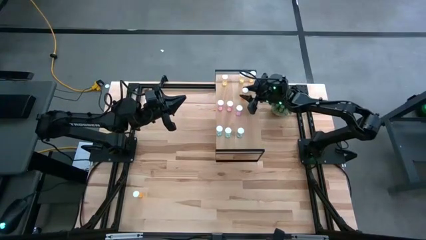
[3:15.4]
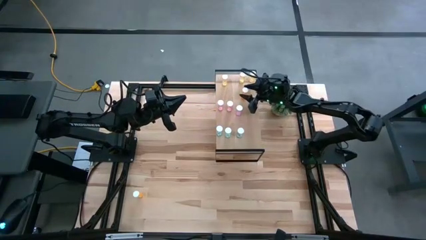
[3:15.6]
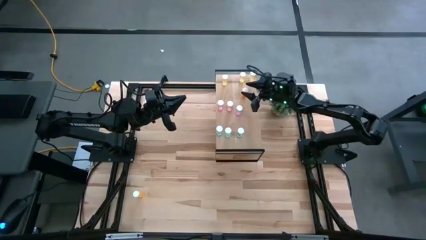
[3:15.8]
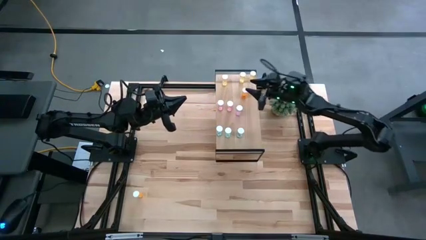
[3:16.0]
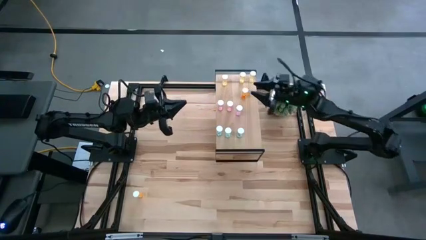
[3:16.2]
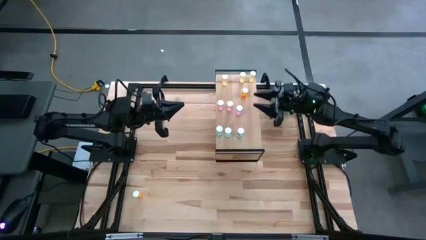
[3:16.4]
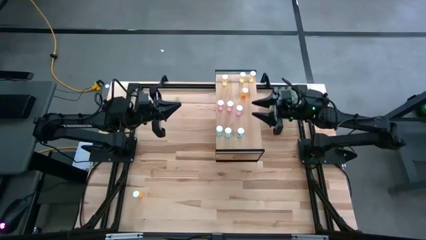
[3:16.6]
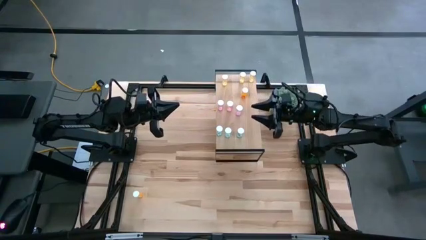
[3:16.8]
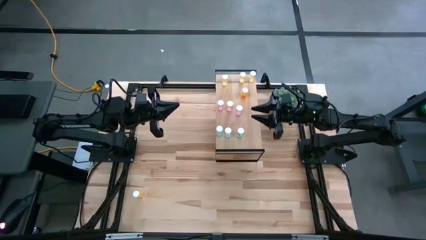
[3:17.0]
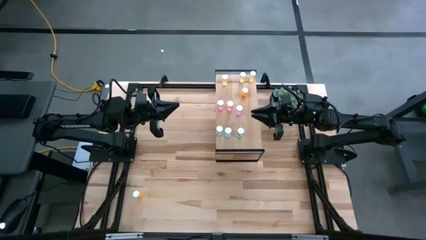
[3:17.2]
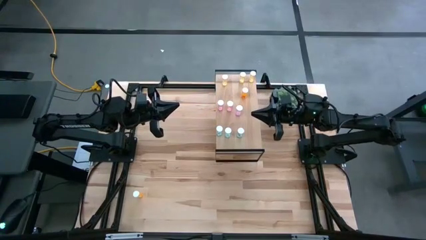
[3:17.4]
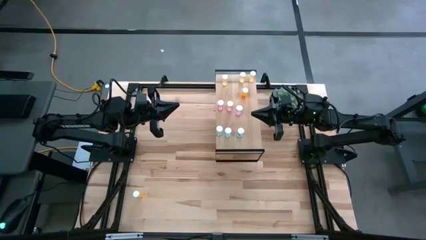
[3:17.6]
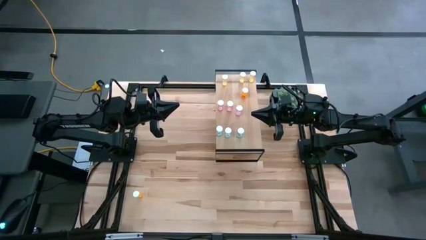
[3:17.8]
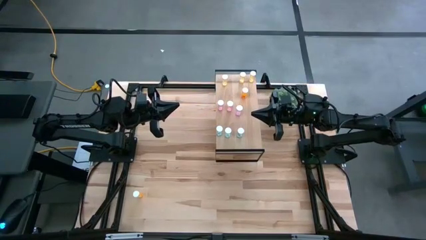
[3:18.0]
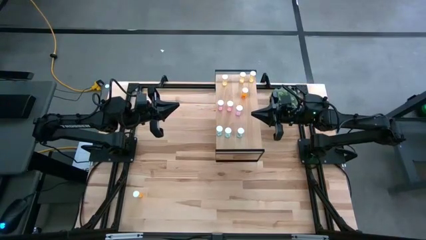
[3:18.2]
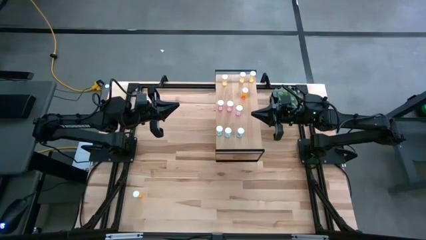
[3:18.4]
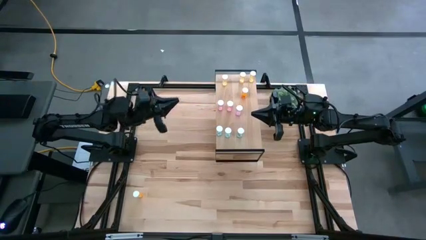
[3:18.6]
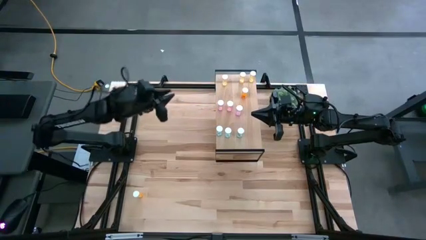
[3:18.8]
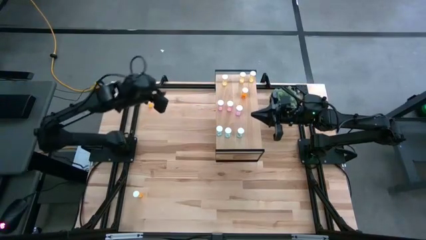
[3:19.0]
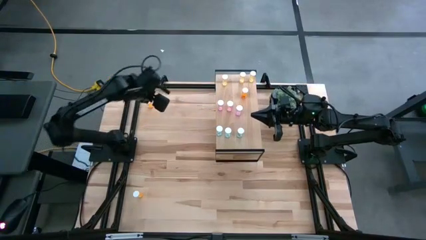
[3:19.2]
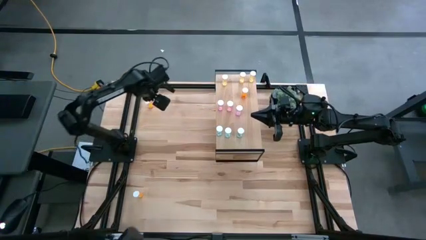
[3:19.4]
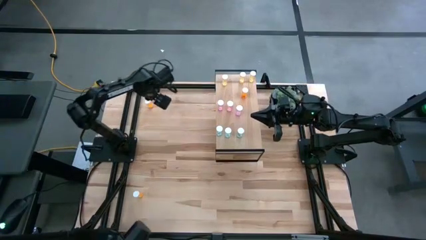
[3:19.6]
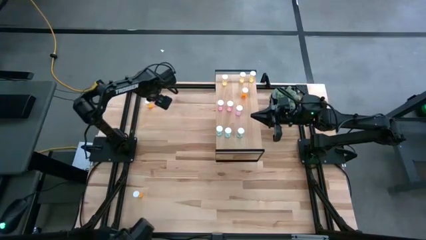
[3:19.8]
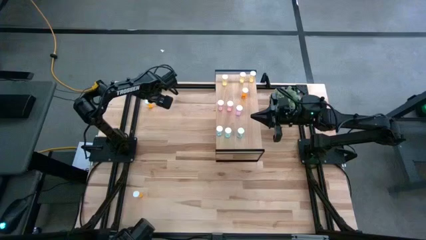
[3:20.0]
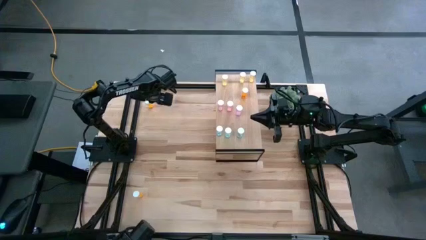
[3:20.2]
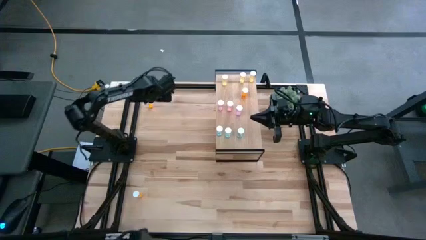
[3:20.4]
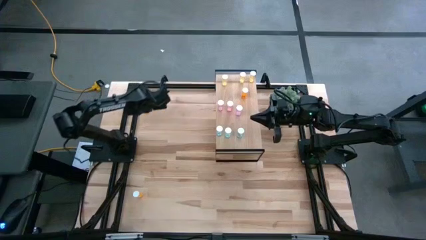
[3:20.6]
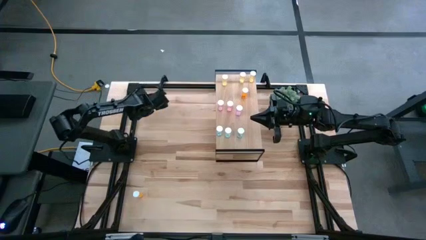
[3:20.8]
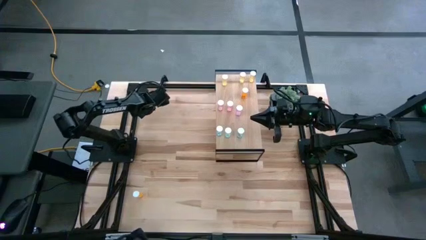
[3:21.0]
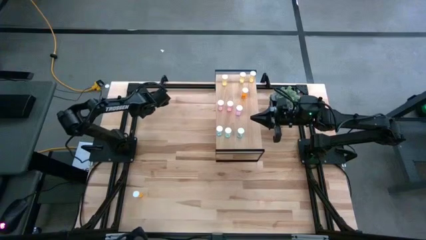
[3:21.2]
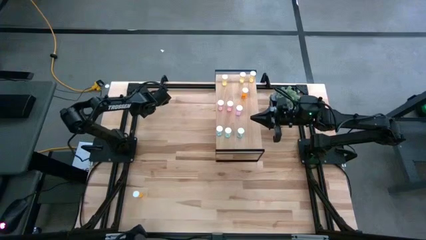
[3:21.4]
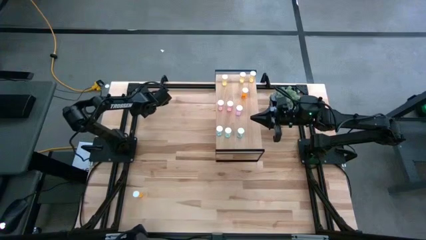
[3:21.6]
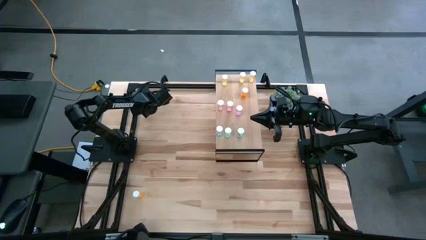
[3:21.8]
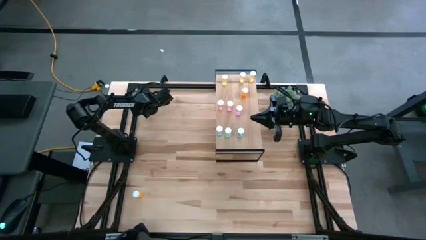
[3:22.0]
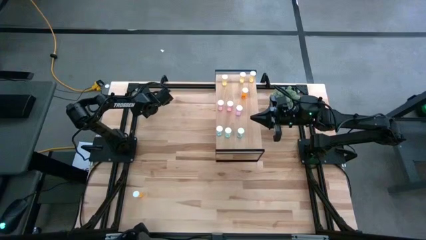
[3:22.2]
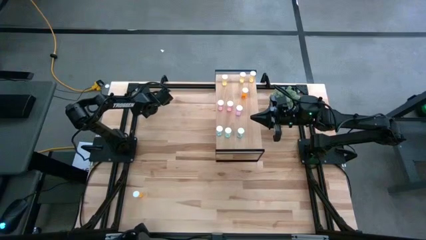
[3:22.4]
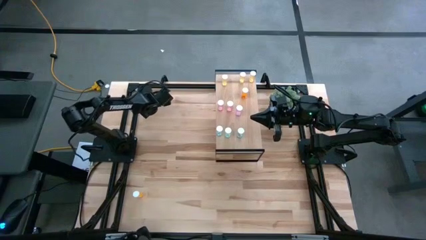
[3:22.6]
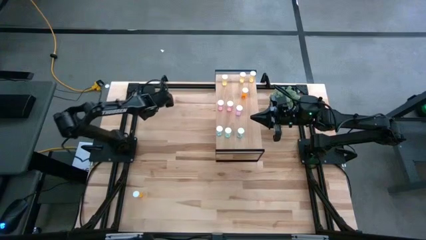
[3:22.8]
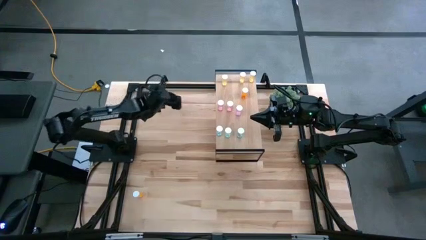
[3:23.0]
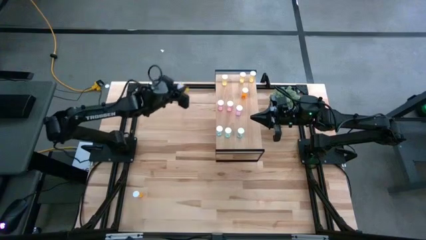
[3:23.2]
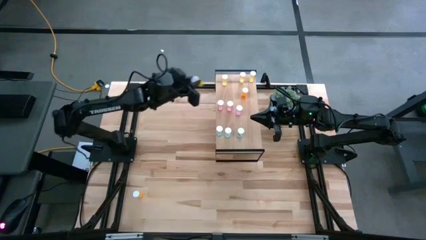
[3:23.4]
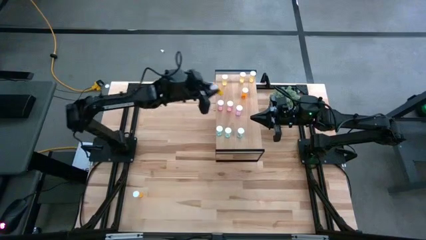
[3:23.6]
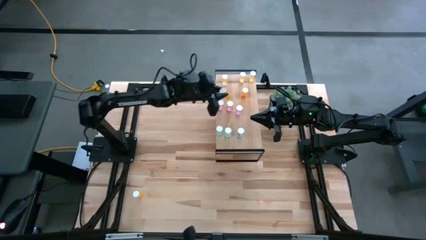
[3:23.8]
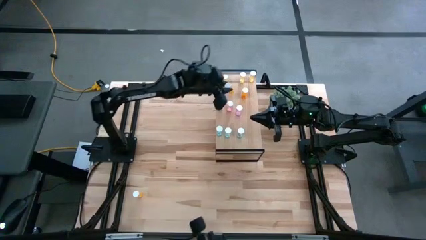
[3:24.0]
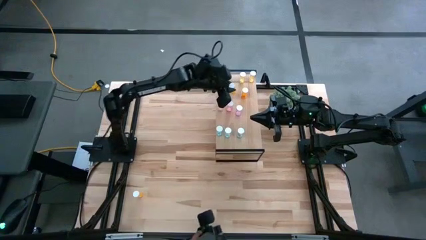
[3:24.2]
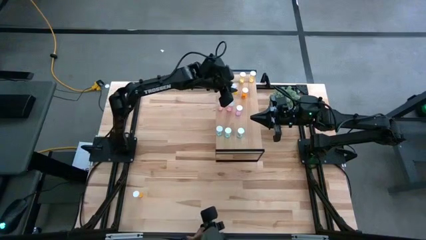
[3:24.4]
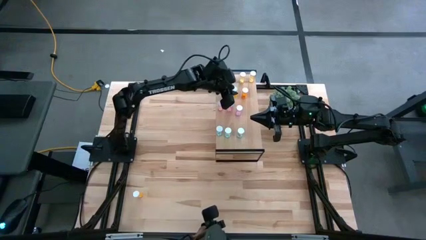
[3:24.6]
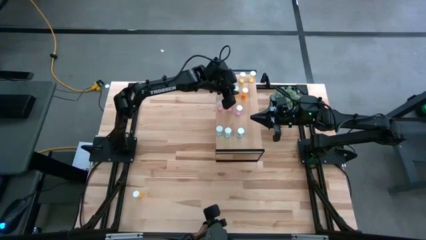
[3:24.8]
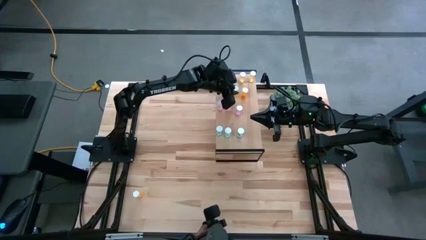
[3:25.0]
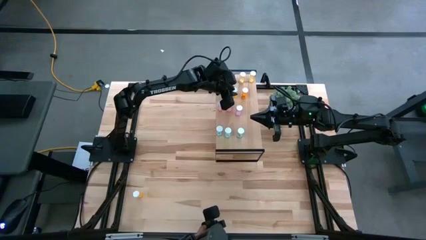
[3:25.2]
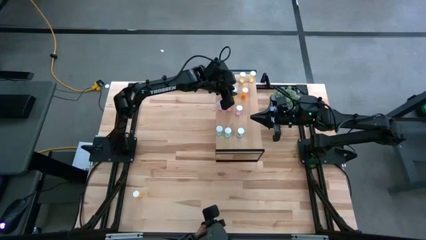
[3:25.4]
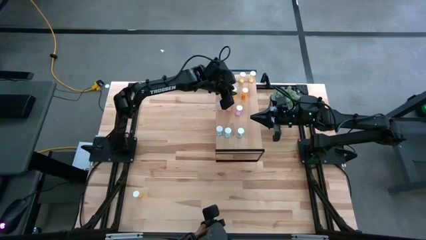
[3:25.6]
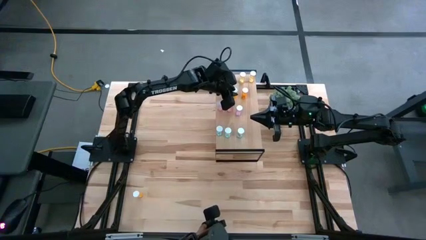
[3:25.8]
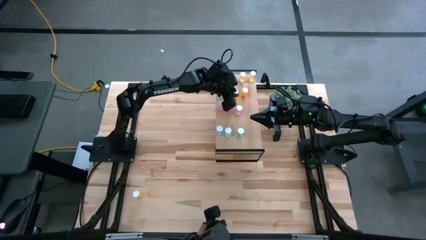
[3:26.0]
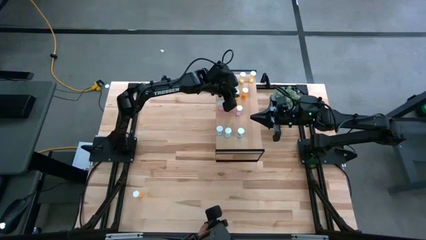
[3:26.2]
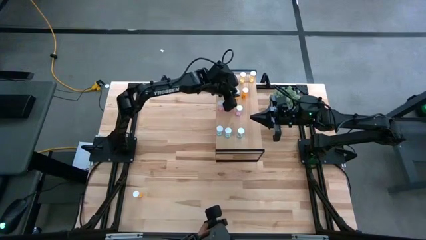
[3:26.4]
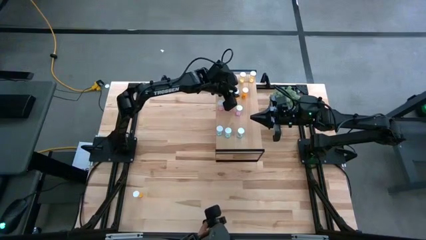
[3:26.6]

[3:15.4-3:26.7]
Task: Pick and place medicine bottles onto shelf by color
Put the top orange pill bottle on the shelf aligned with the other orange pill bottle

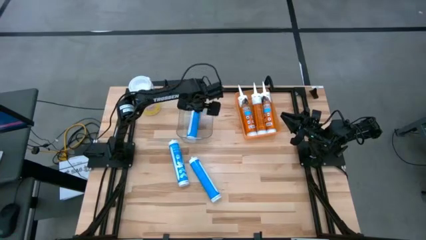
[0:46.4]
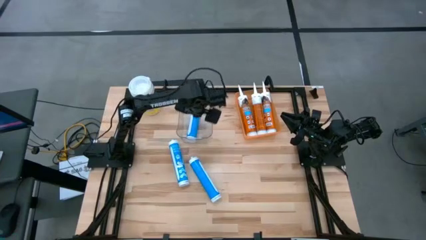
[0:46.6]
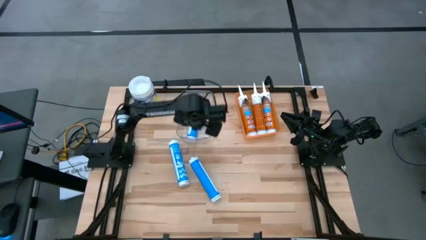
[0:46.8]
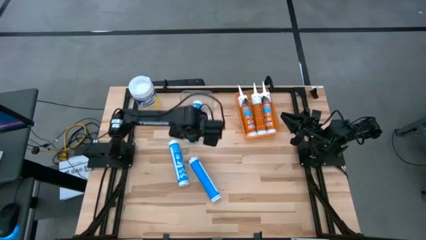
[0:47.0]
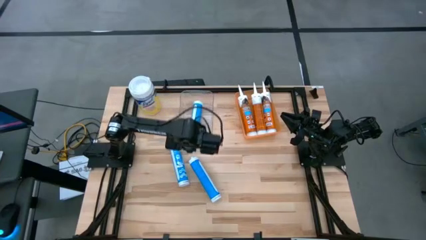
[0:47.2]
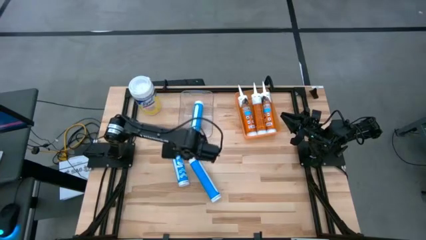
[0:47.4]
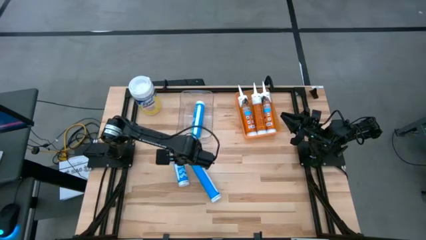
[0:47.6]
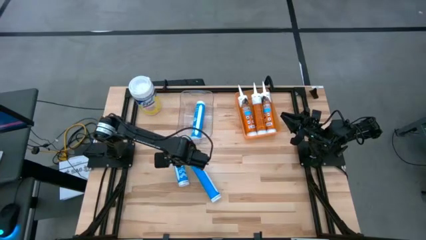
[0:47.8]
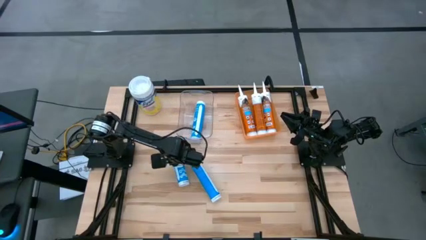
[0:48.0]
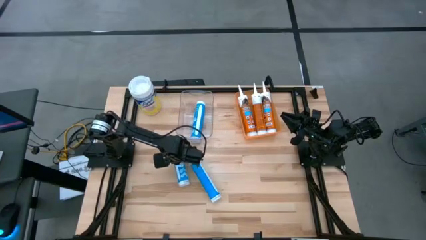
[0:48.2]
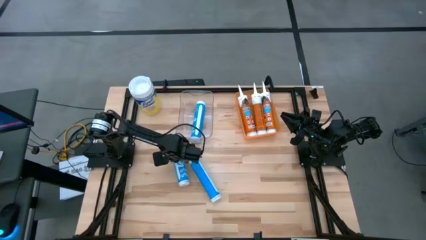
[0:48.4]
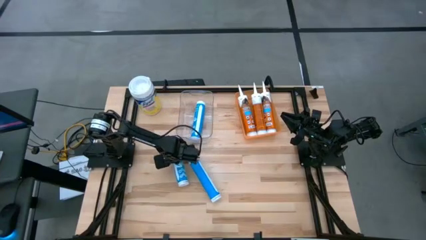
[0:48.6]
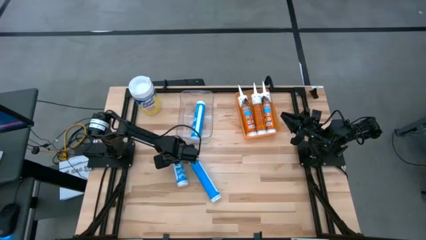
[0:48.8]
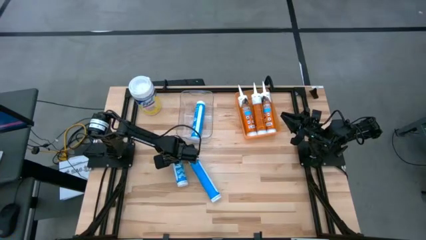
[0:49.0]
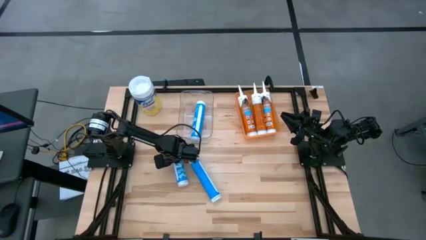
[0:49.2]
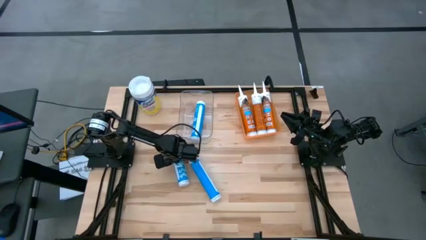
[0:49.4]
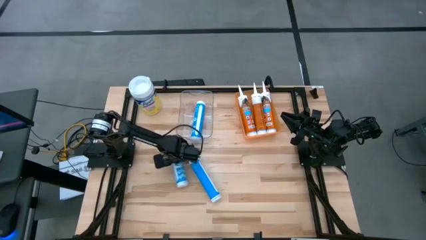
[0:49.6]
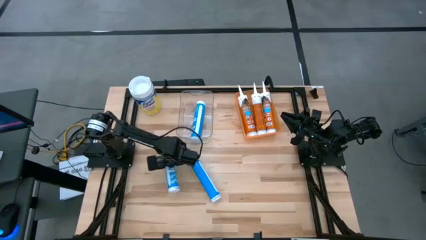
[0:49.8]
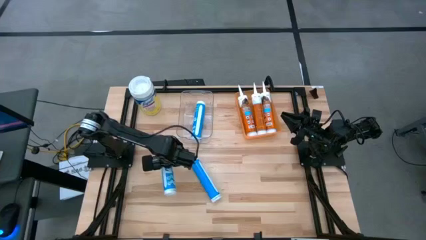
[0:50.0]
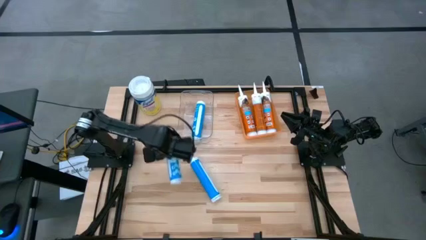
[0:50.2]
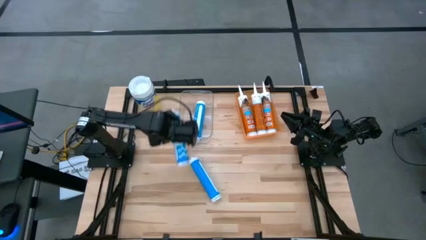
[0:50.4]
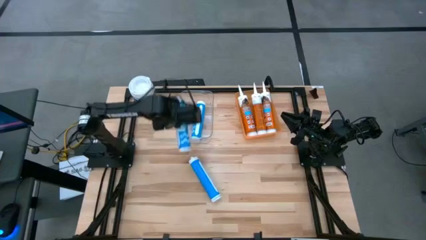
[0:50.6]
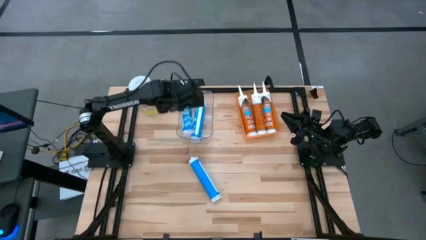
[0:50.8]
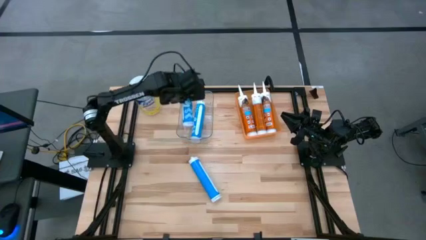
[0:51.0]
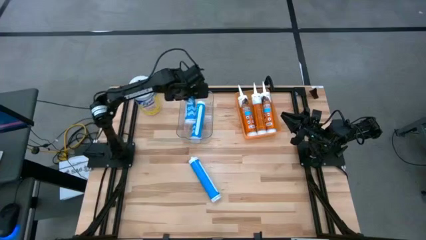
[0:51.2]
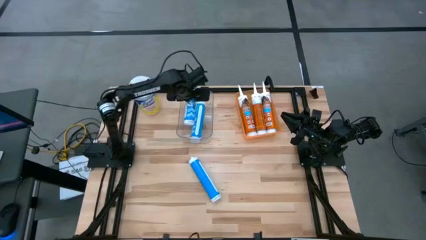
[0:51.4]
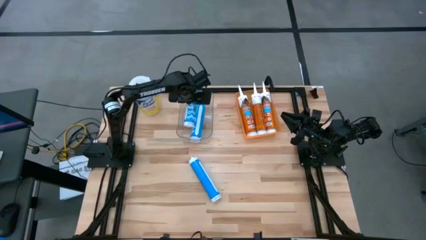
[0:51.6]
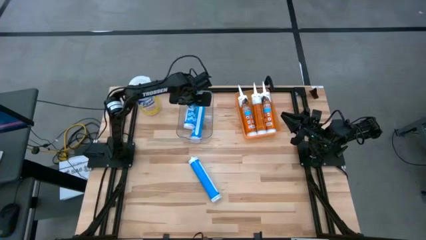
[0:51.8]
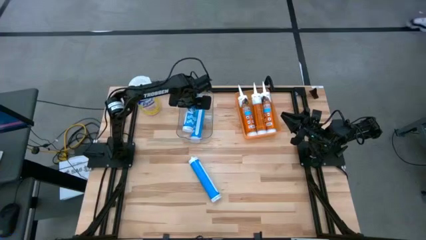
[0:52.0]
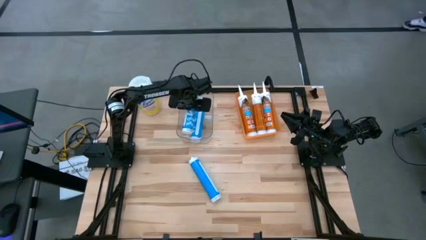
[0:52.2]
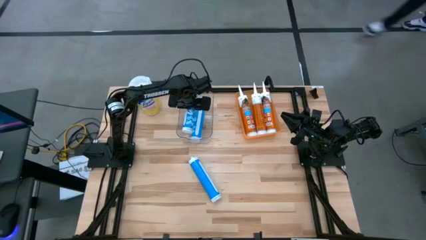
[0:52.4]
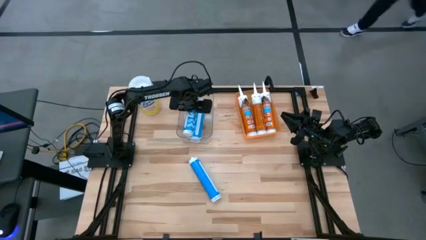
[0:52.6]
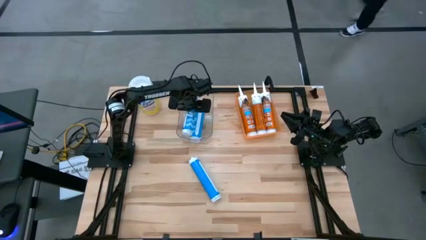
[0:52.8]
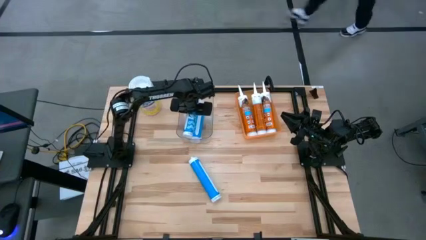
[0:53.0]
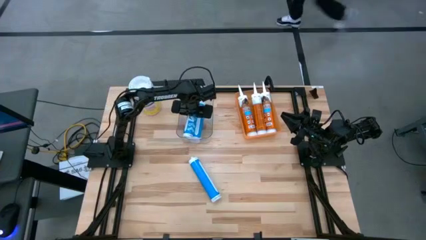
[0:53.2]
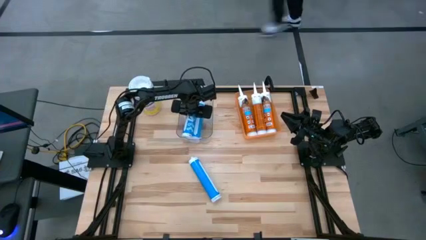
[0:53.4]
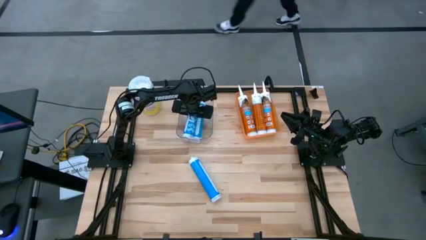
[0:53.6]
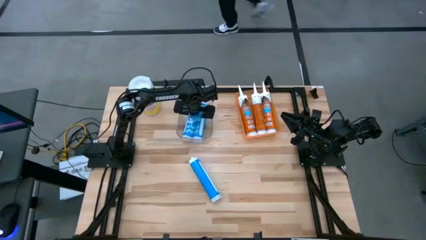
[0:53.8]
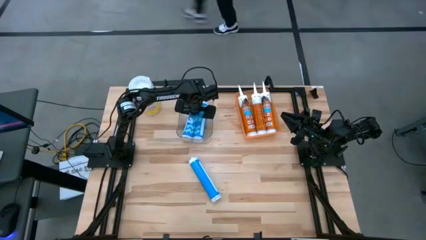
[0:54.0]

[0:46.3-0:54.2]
Task: Pick & place silicon tubes, Sealant and Lysol wipes
Put the left blue sealant into the transparent bin
